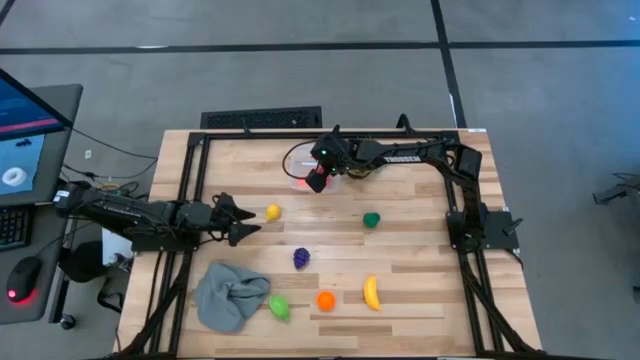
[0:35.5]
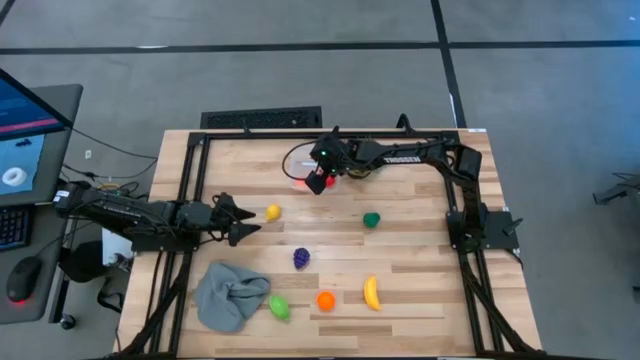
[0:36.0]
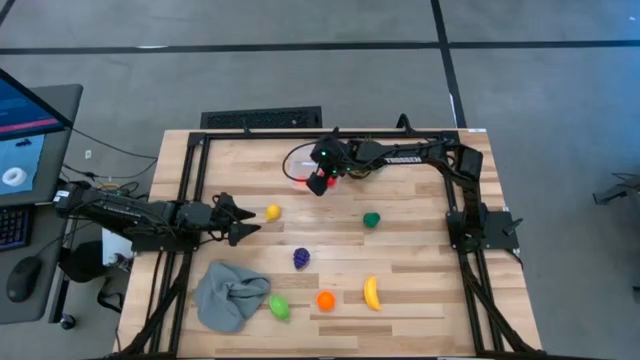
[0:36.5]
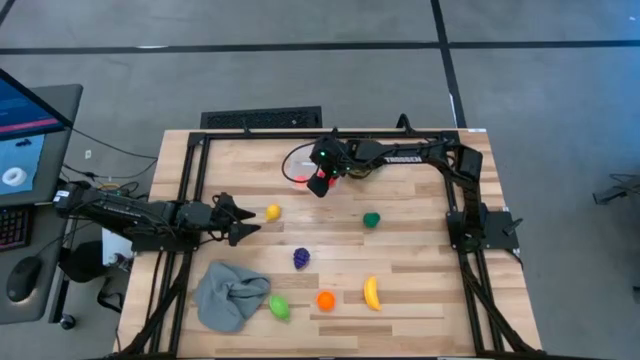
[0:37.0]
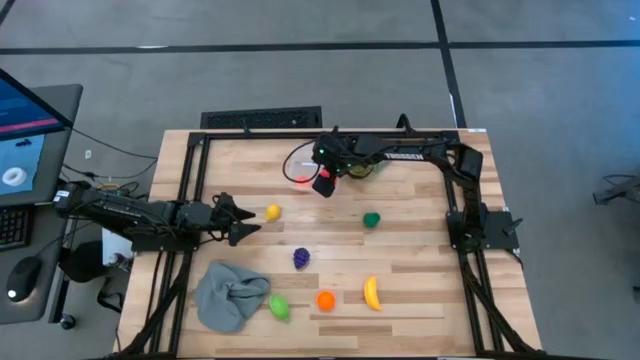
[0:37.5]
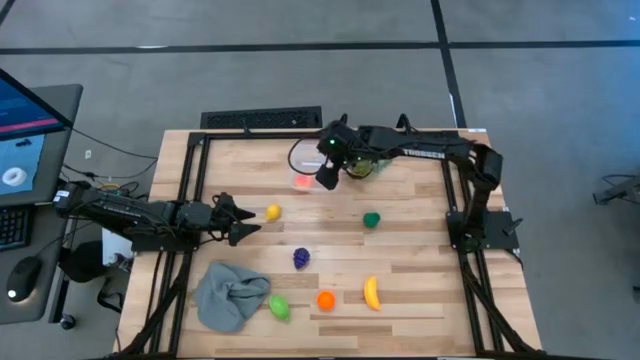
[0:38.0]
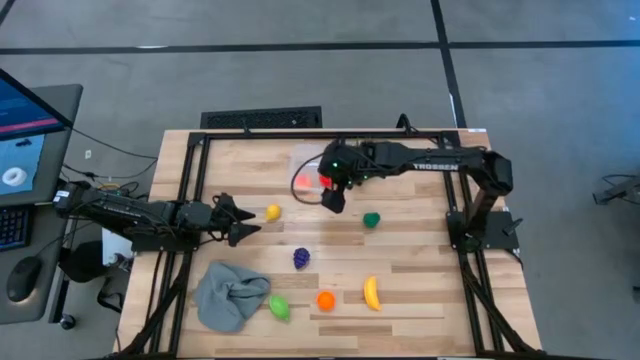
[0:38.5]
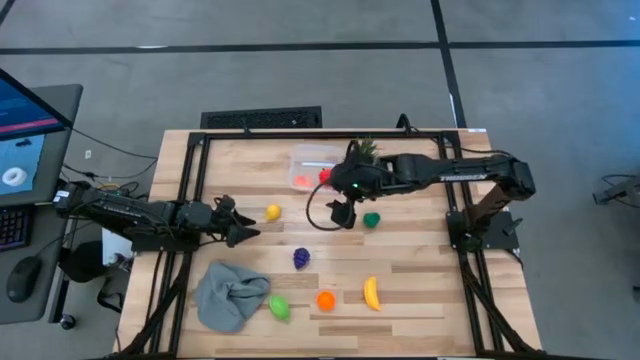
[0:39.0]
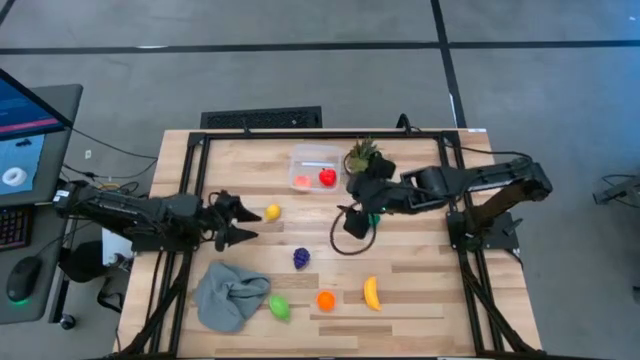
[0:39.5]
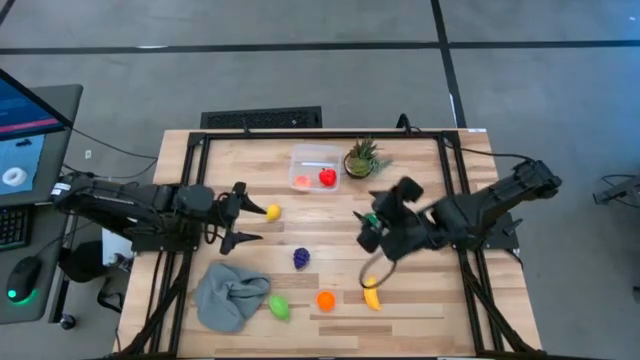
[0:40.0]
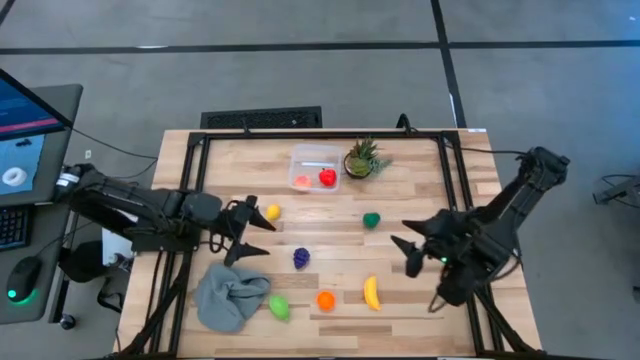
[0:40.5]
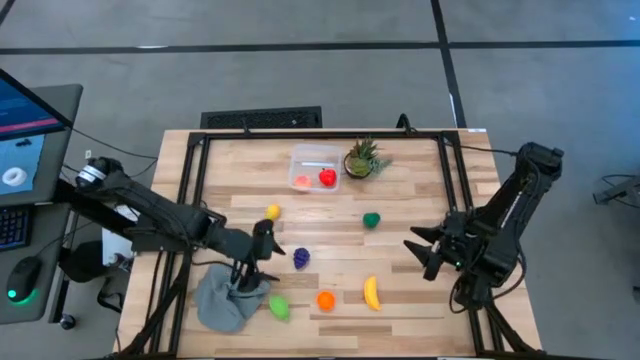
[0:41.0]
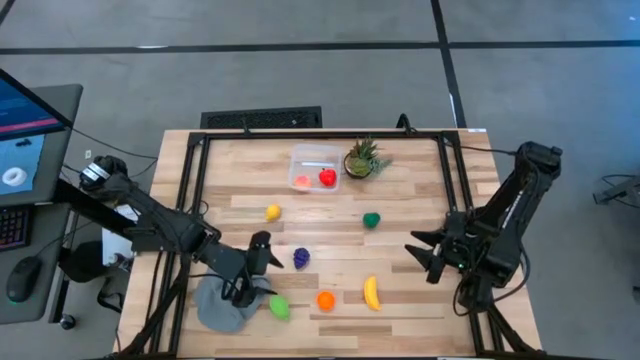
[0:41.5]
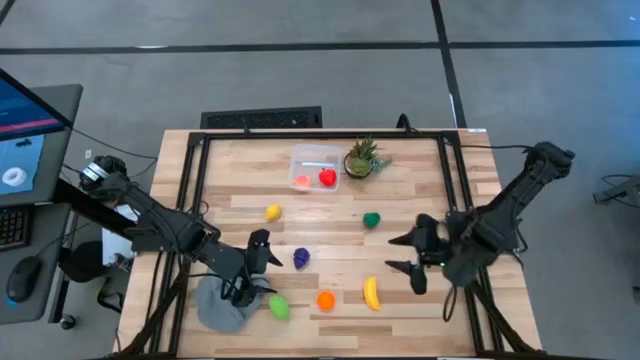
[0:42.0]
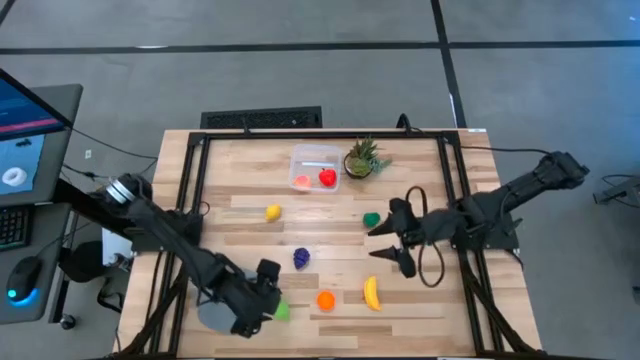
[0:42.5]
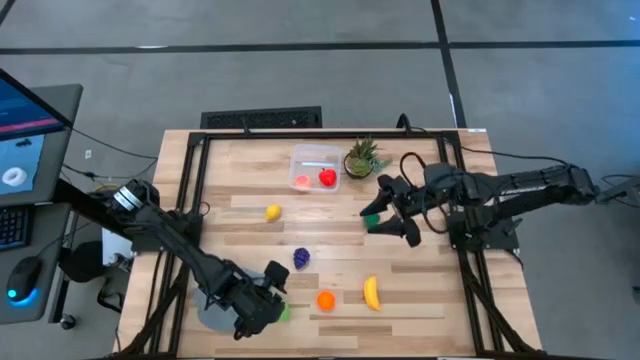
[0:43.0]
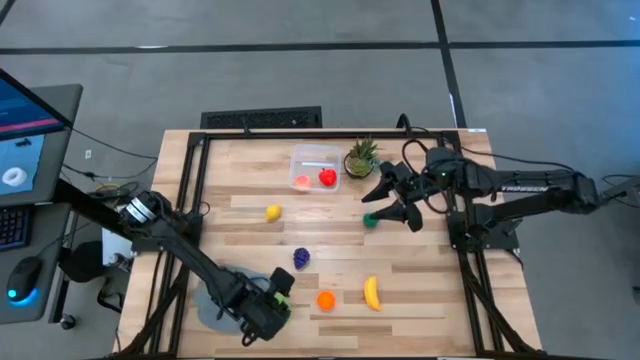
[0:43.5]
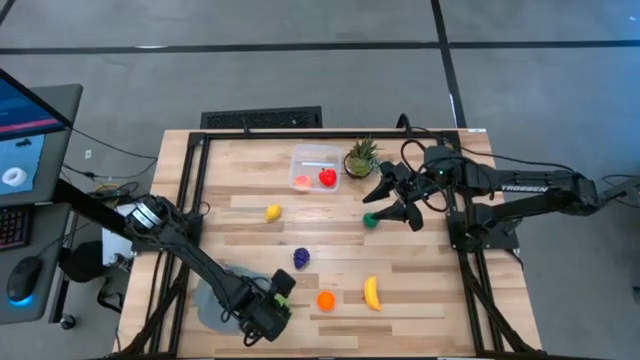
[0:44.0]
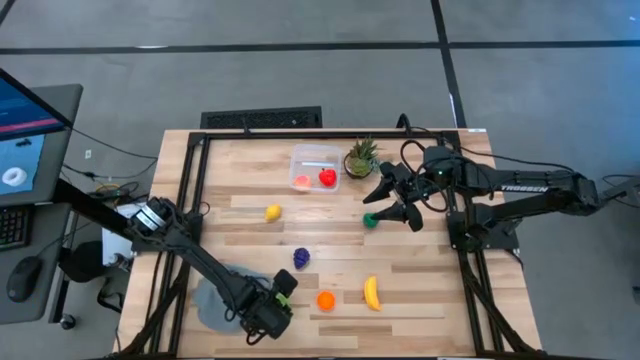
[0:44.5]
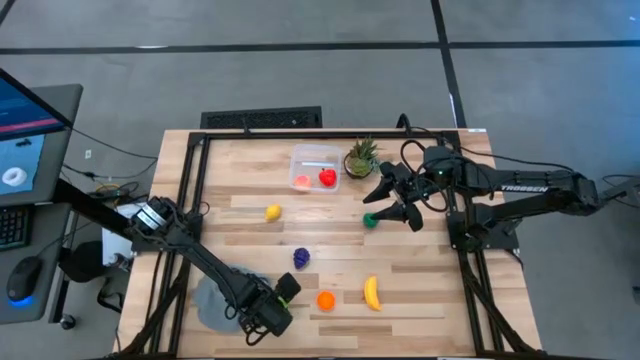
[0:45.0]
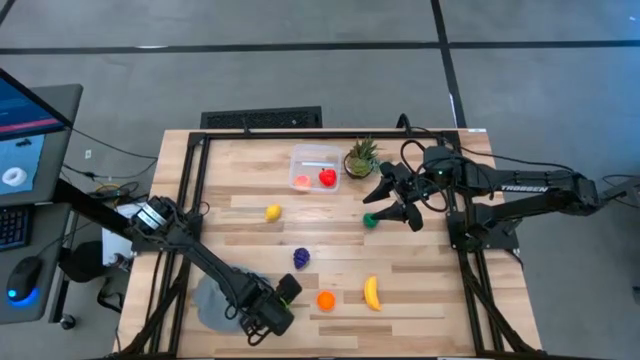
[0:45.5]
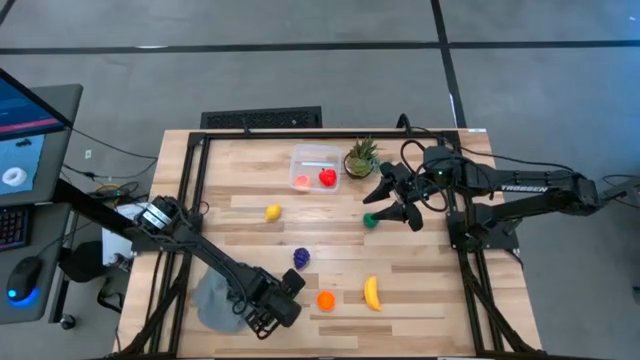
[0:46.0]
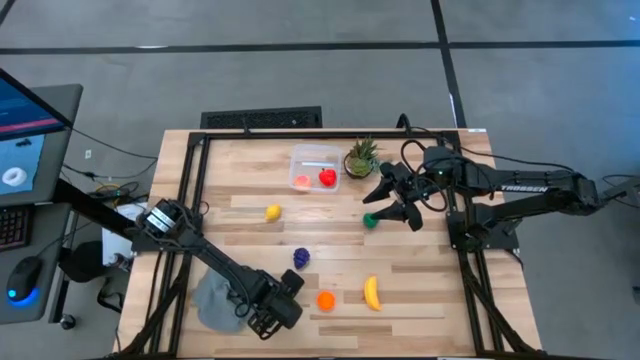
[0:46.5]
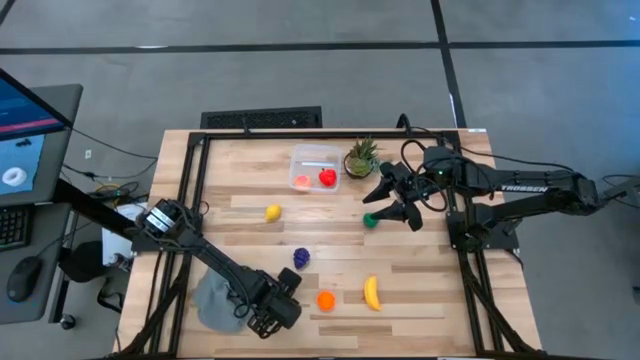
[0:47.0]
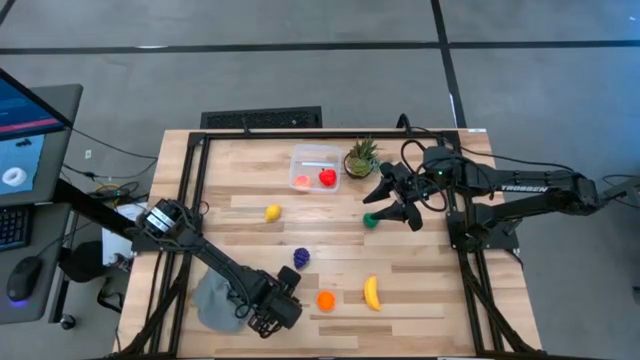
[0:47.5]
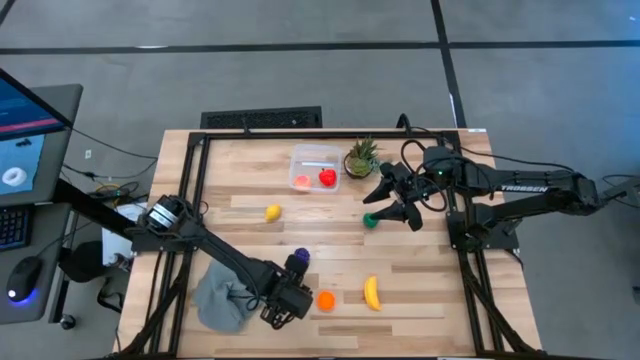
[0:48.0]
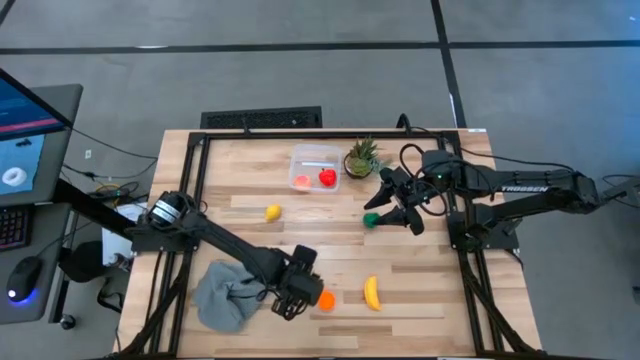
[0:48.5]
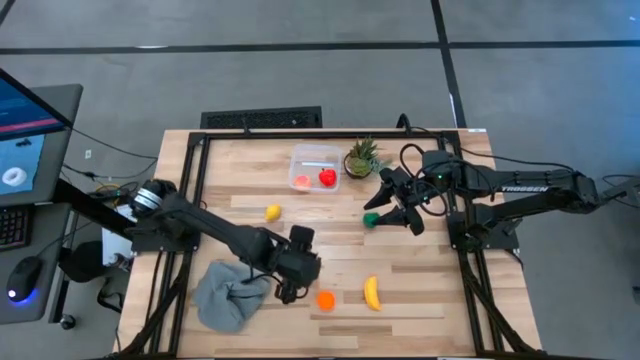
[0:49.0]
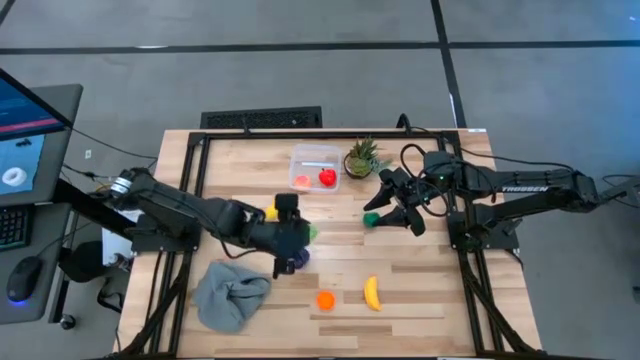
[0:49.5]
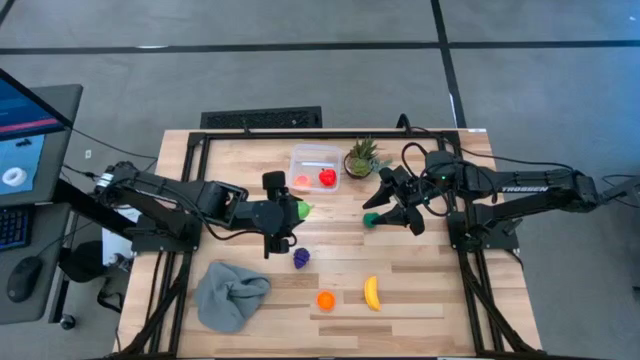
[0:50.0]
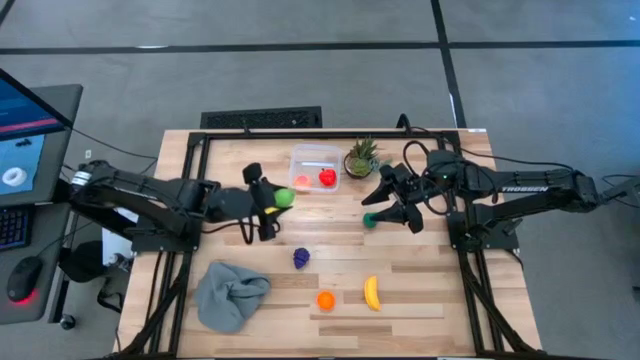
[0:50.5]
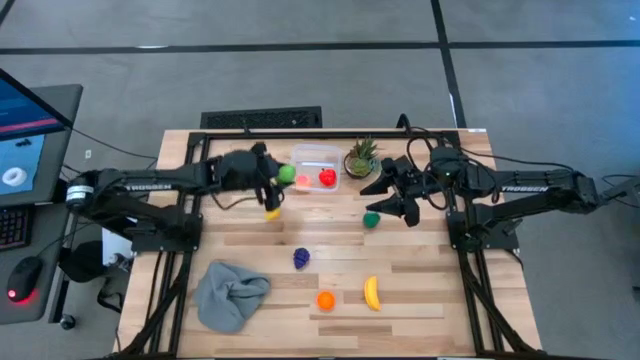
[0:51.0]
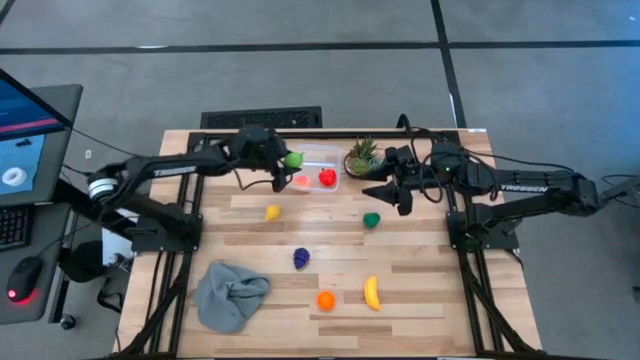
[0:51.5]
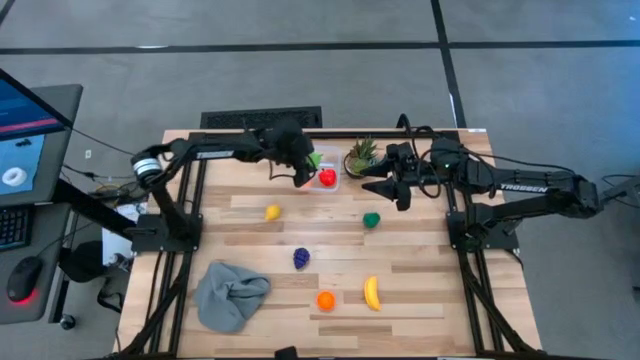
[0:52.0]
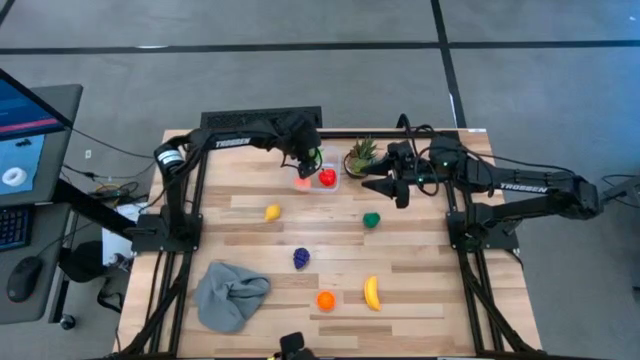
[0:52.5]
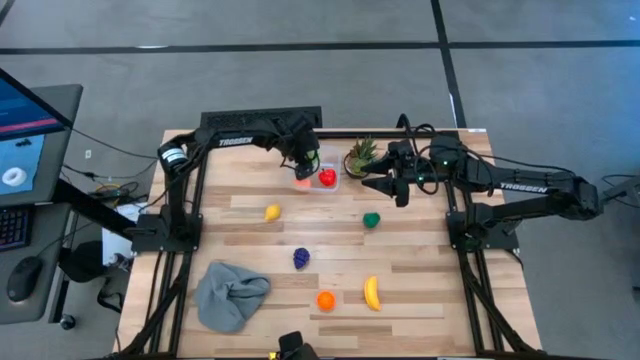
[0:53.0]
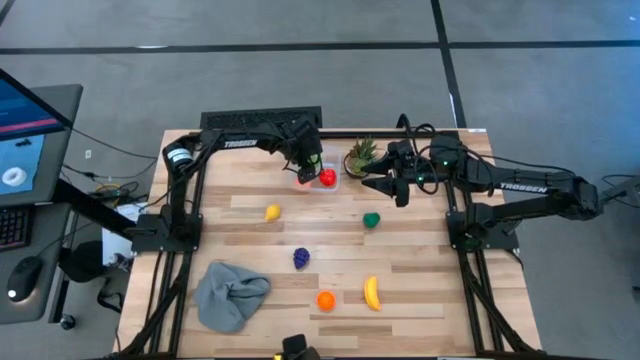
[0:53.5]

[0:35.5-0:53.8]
Task: Pick and placing Produce into tupperware
Put the green melon into the transparent container

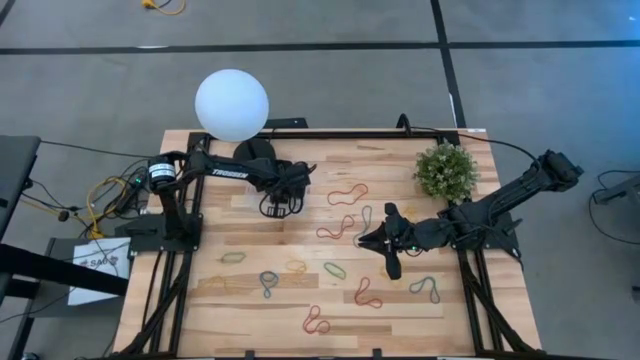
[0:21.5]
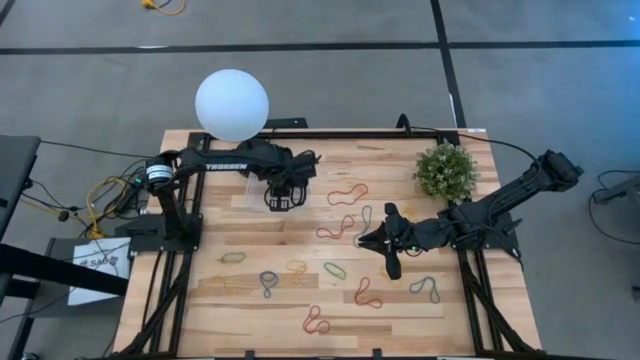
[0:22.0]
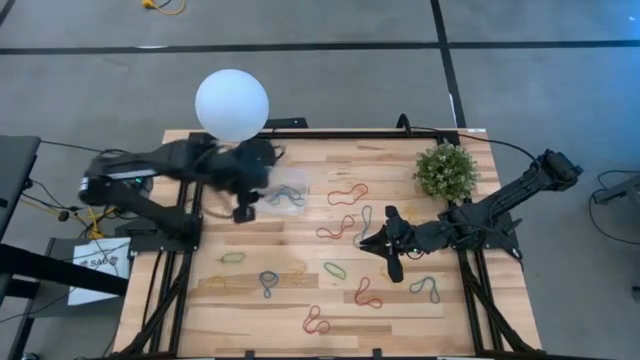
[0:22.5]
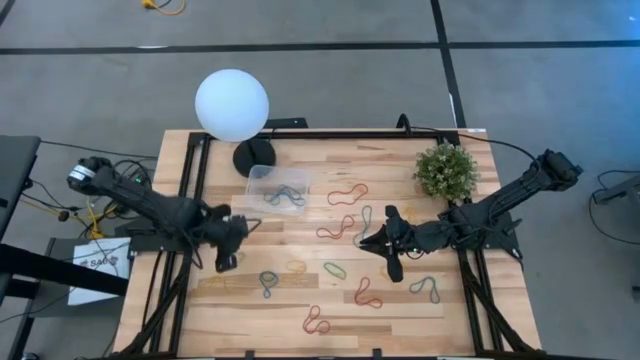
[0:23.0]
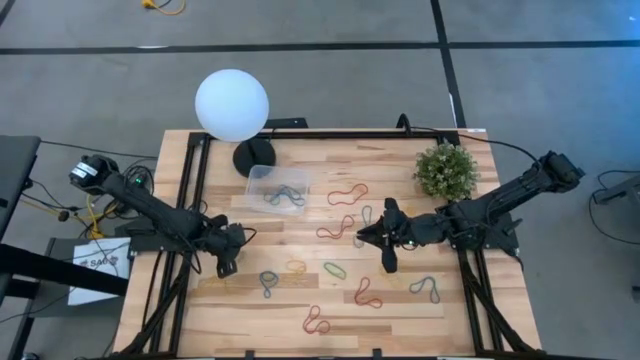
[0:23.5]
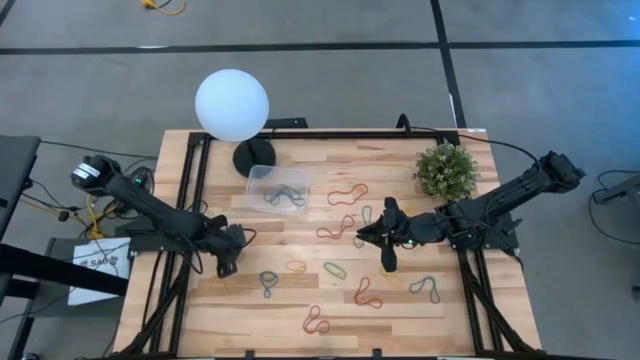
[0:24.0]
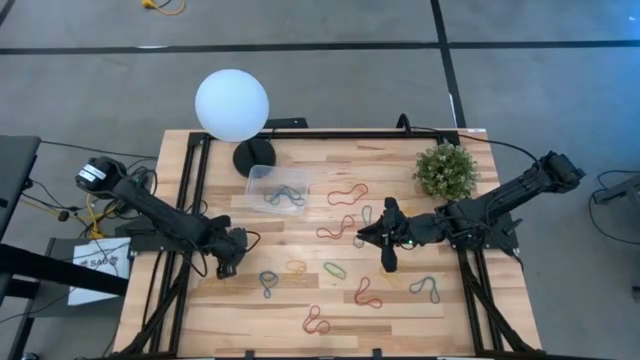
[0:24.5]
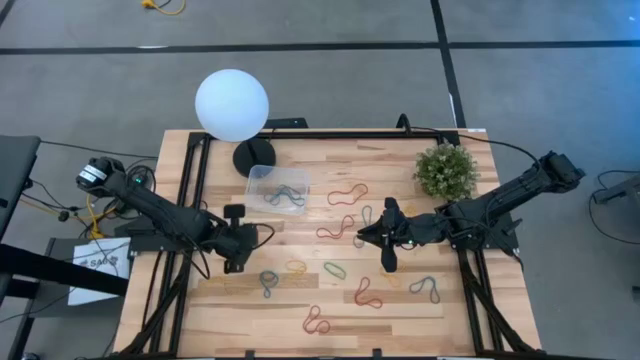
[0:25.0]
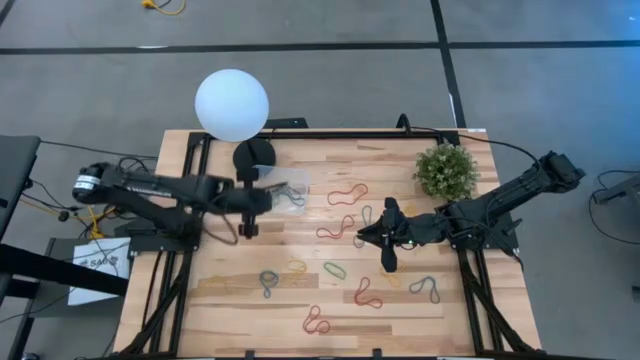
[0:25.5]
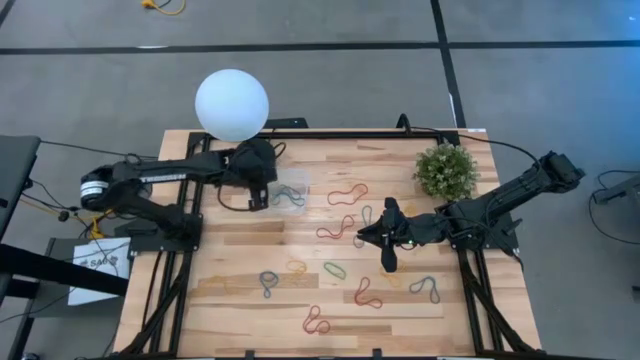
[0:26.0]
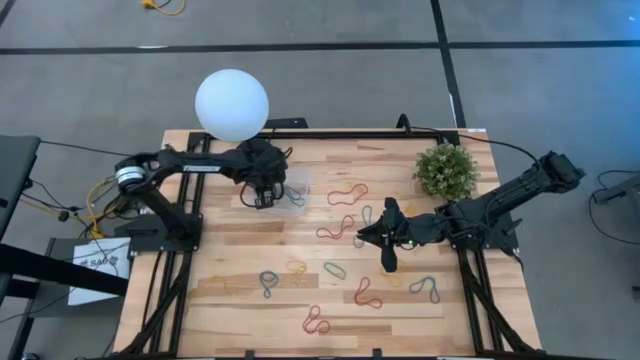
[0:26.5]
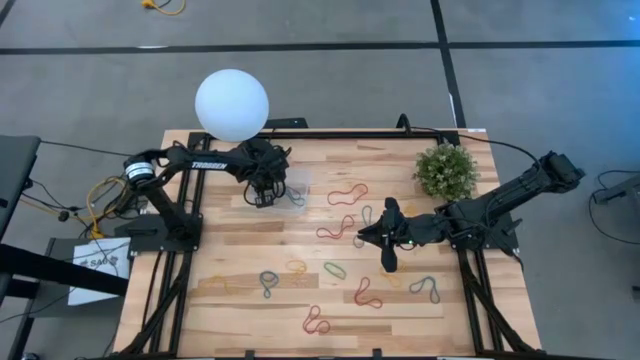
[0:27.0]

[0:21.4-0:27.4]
Task: Pick and place rubber bands into bin
Put the green rubber band into the transparent container
